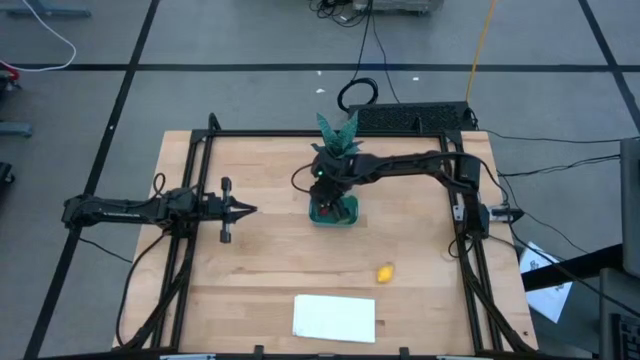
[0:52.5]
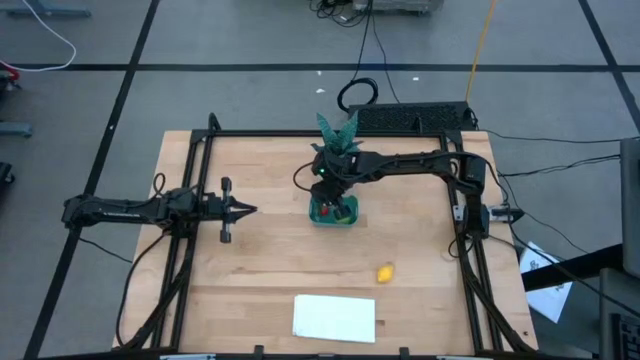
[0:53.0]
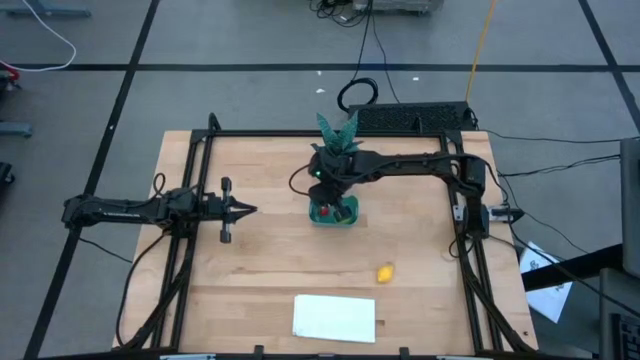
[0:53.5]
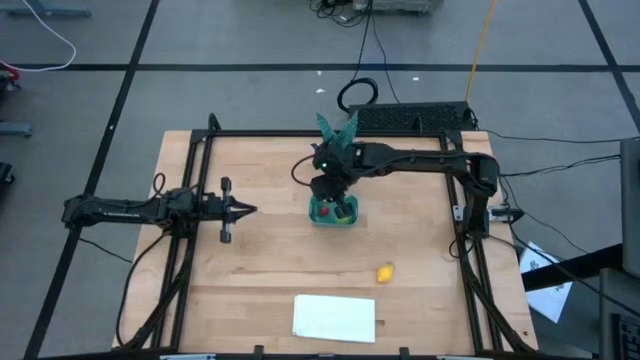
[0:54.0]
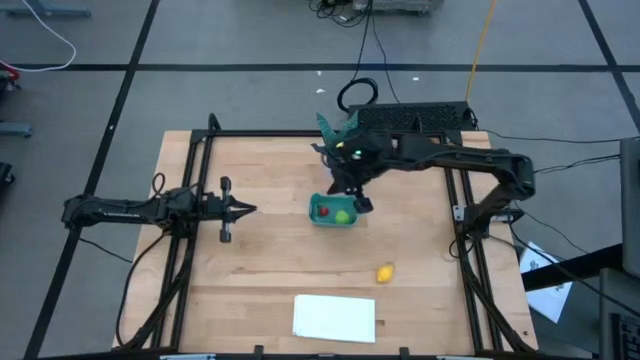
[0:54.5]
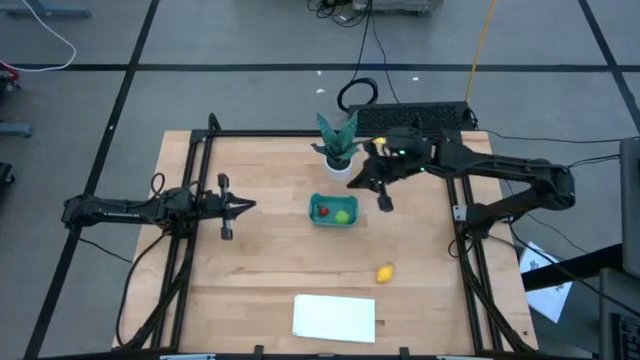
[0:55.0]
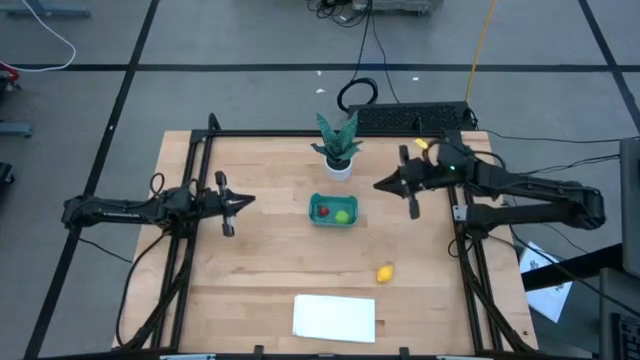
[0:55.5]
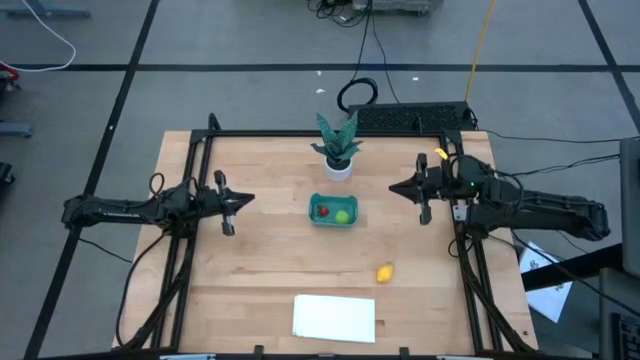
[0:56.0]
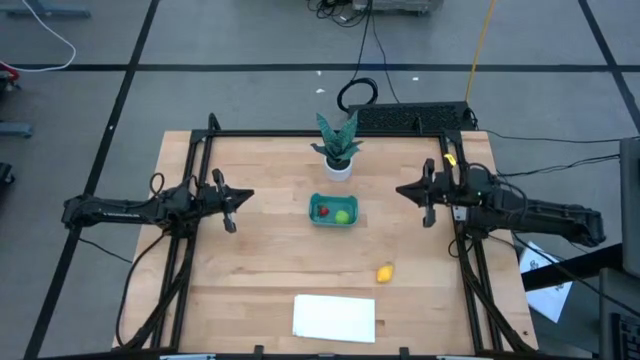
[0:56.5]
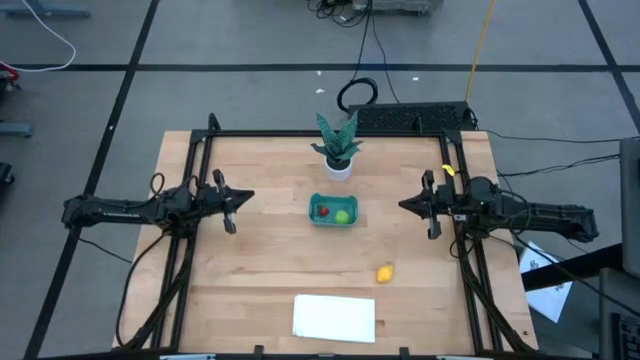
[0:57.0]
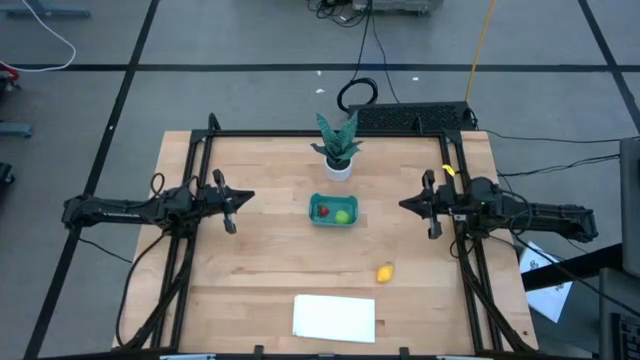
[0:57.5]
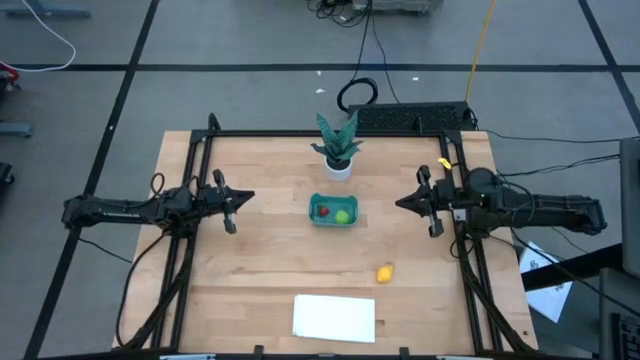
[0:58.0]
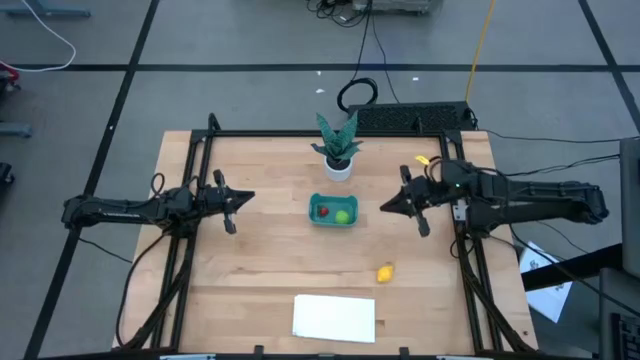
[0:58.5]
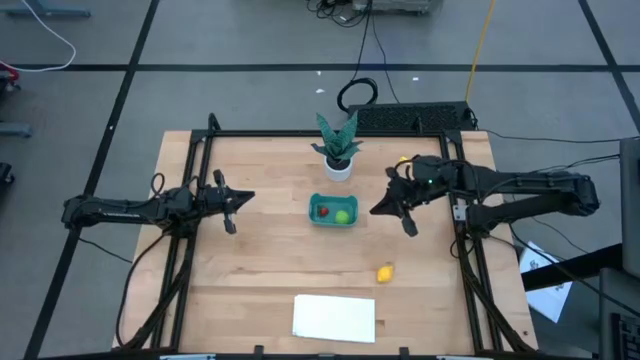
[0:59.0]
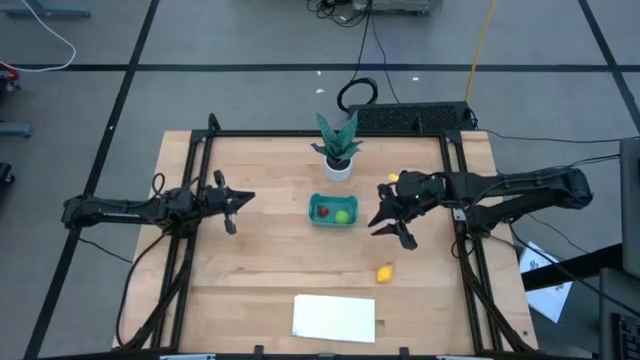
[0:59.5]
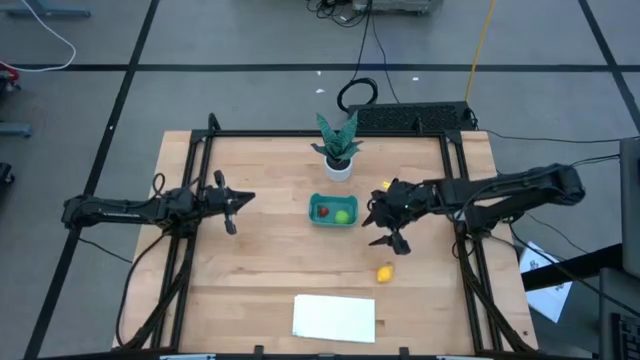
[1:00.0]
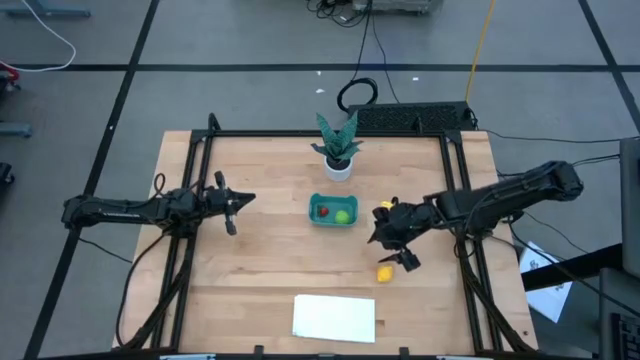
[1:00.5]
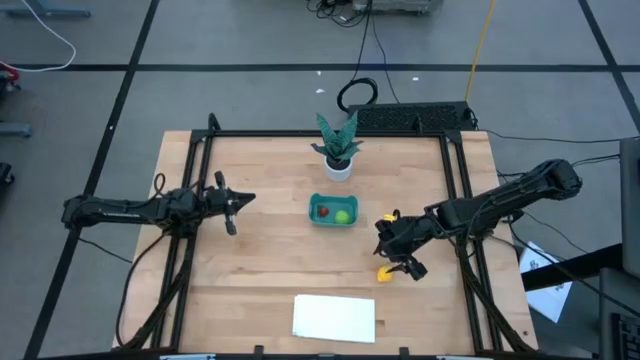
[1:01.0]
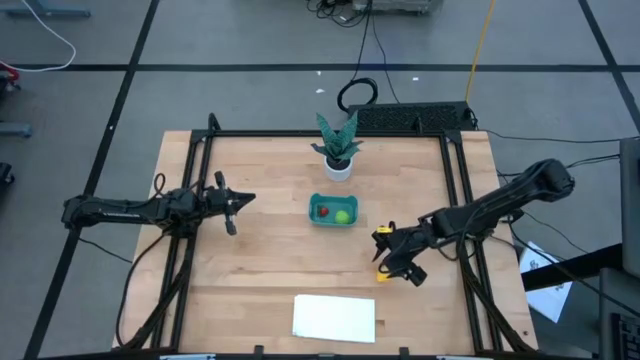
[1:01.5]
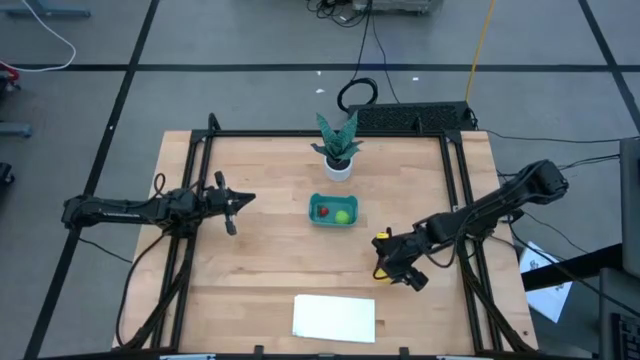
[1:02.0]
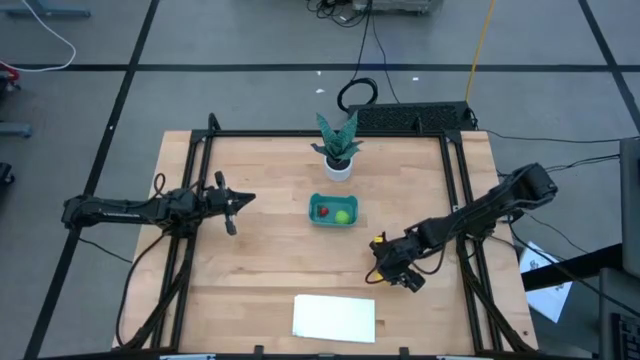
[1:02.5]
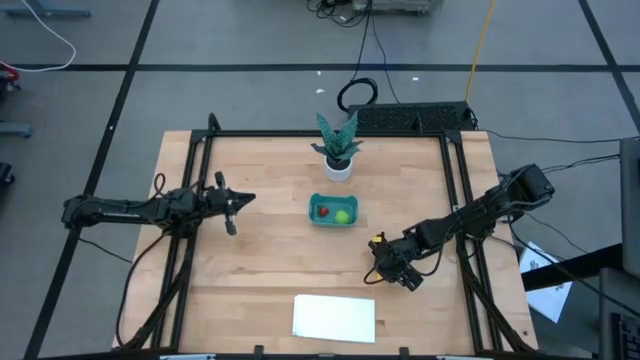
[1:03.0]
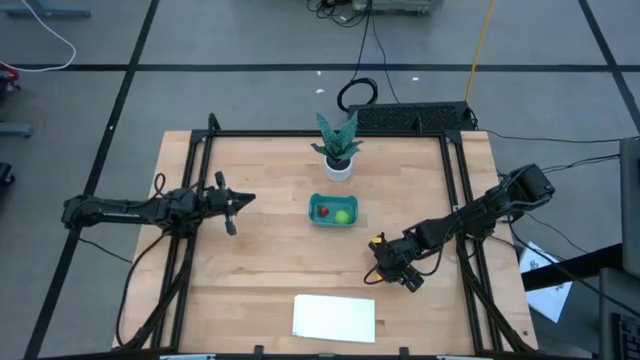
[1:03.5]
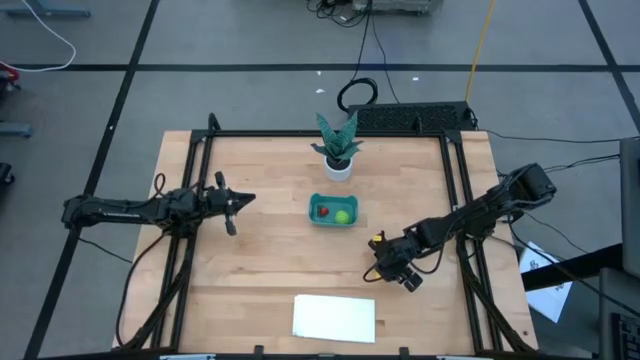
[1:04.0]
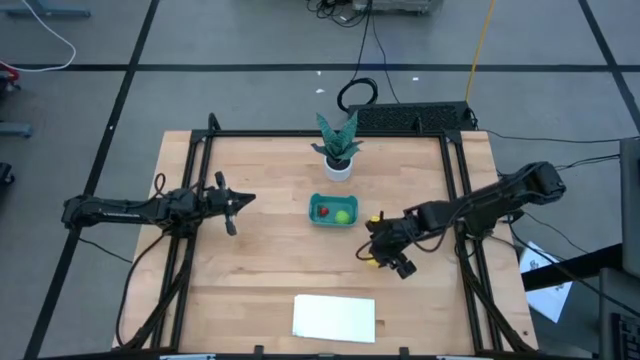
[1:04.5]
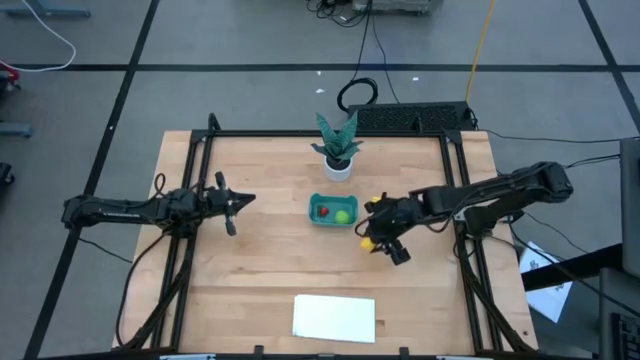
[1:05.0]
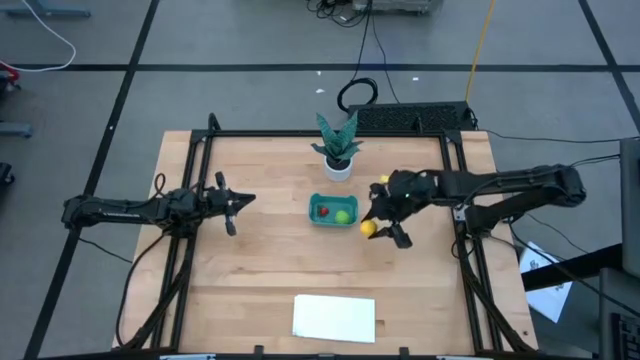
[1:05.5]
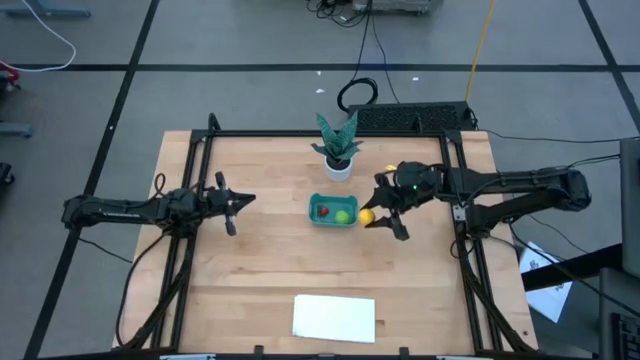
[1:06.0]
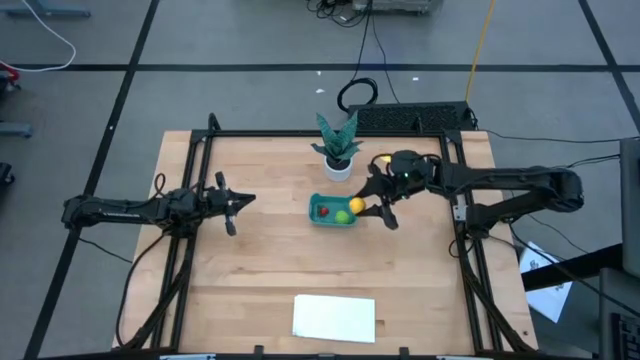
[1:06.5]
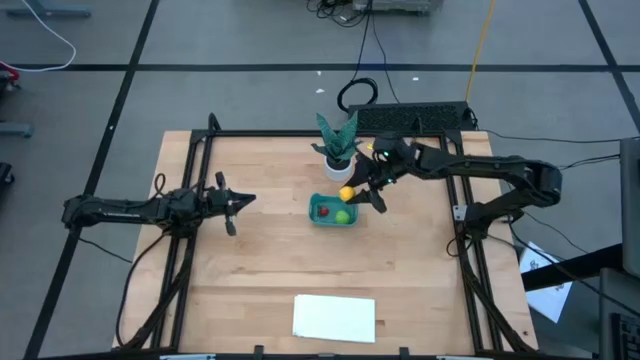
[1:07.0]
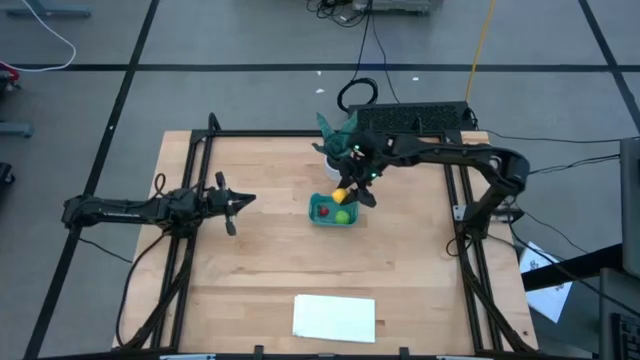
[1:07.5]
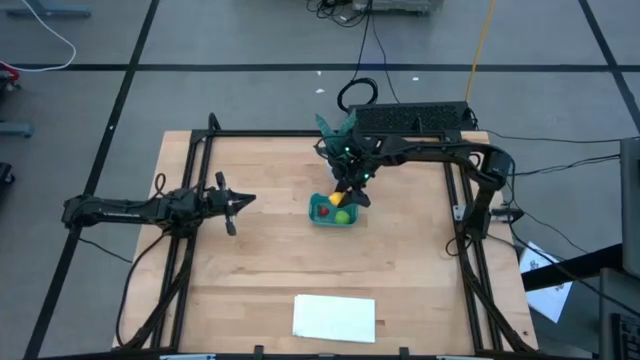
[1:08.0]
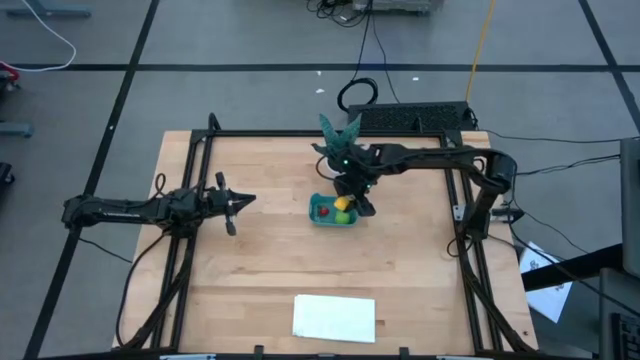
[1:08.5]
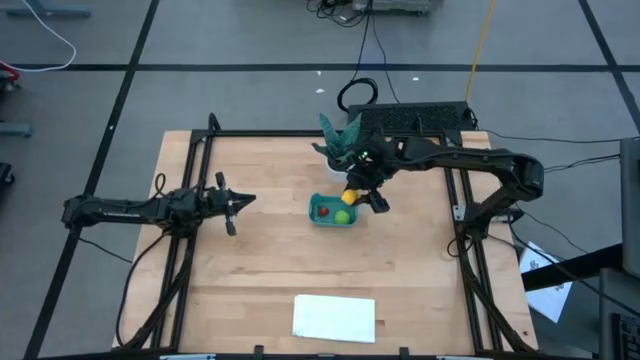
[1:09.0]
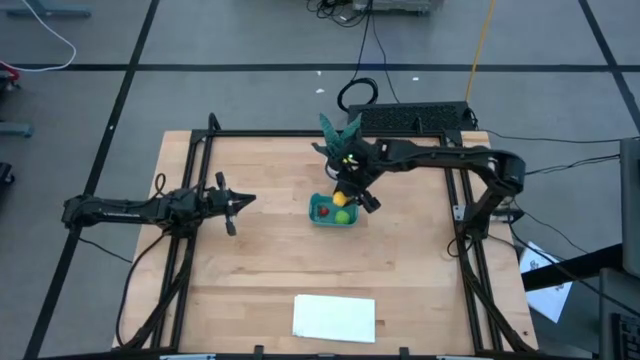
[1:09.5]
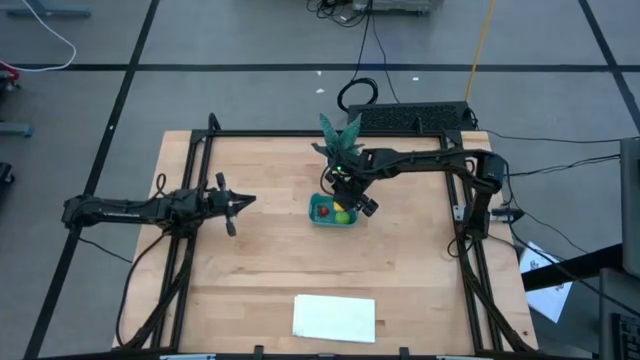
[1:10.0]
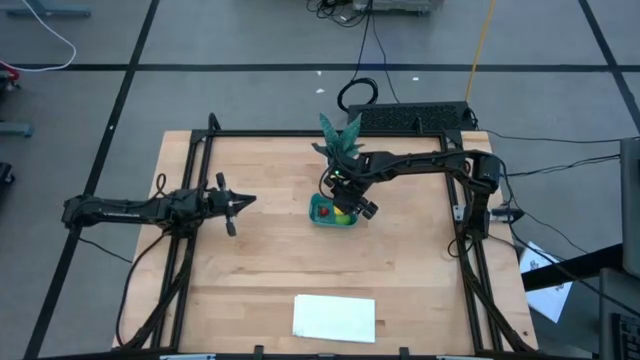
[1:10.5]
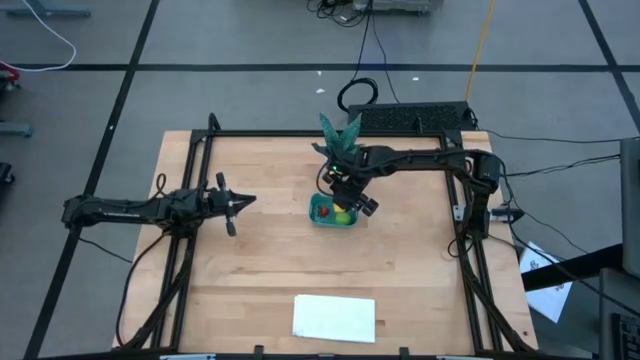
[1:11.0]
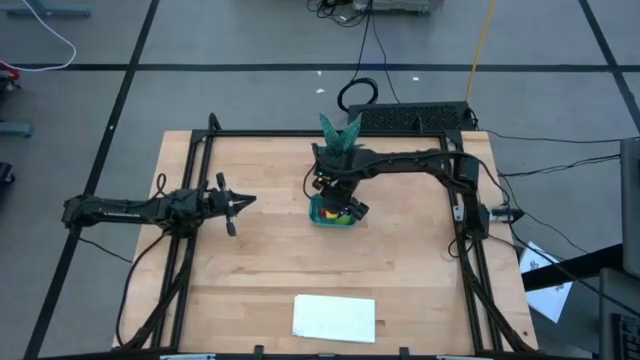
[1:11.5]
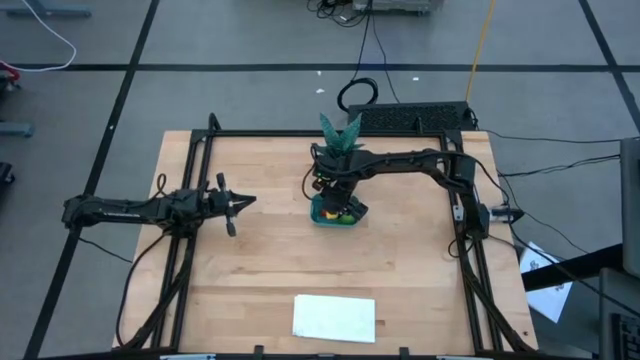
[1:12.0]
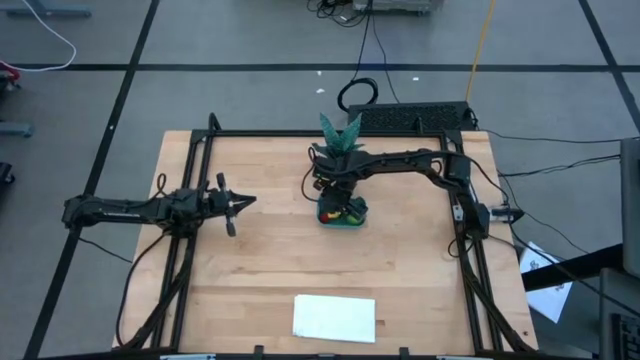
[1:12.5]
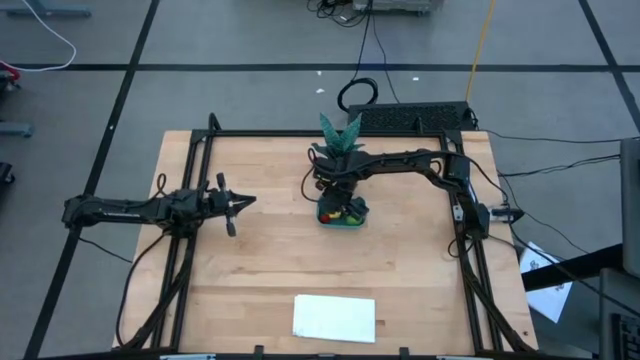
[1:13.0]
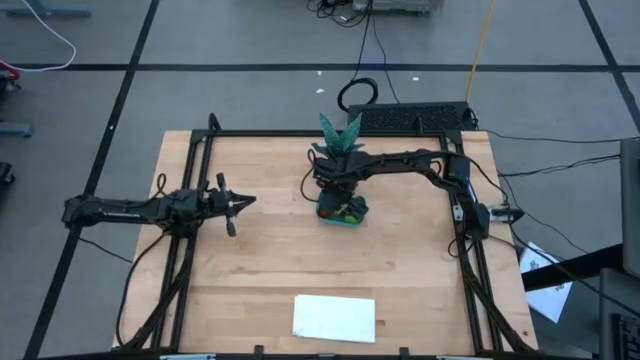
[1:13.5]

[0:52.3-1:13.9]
Task: Pick and placing Produce into tupperware
Put the yellow lemon into the green bin
